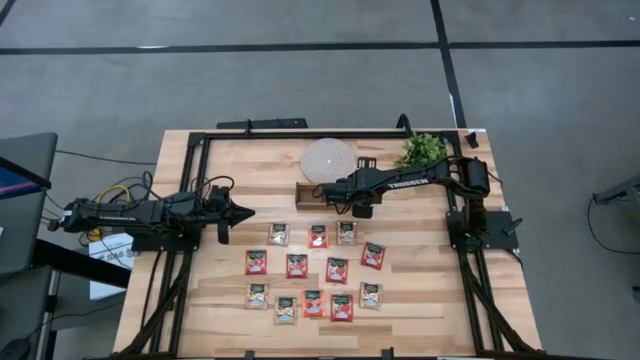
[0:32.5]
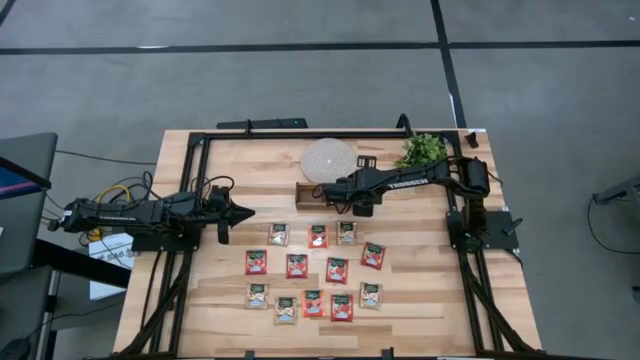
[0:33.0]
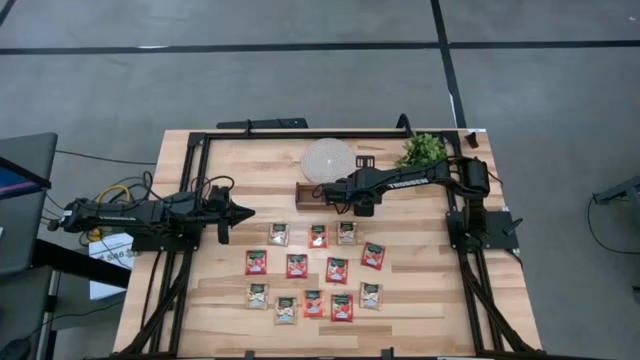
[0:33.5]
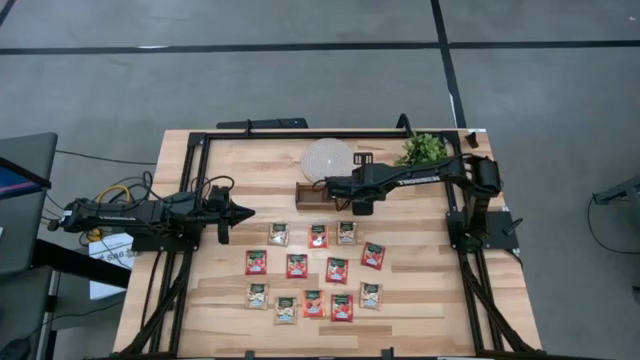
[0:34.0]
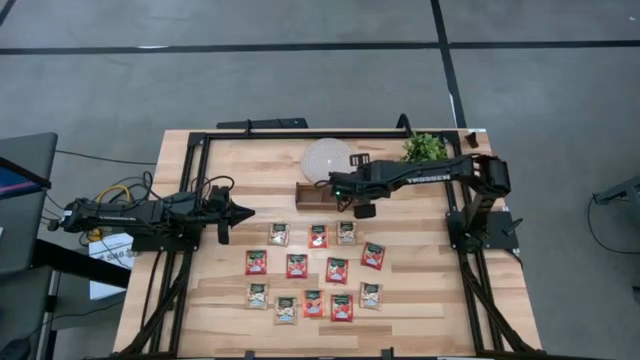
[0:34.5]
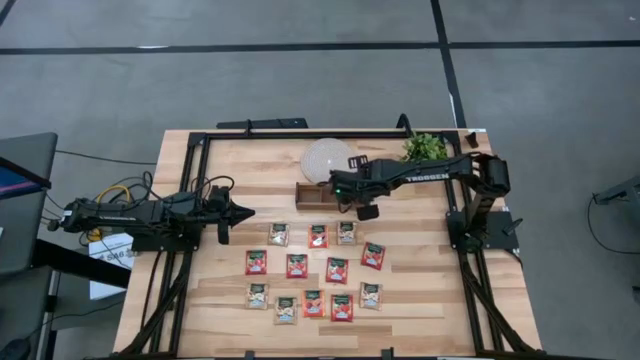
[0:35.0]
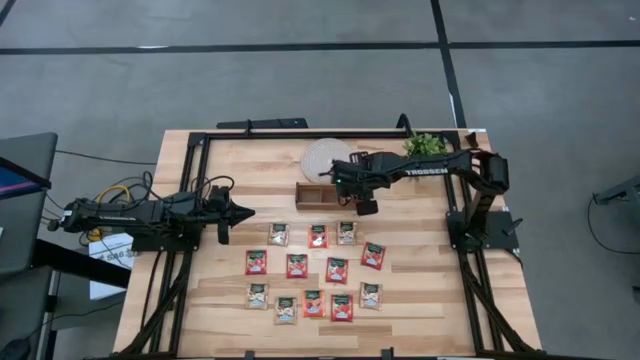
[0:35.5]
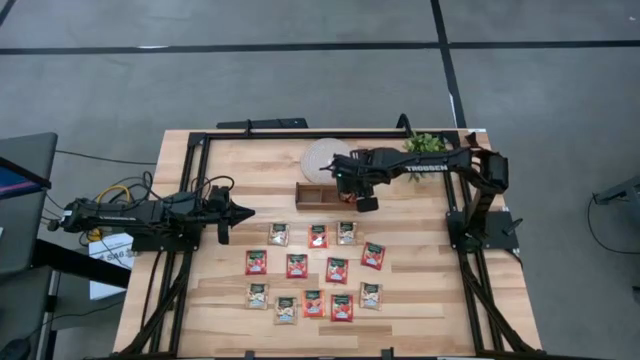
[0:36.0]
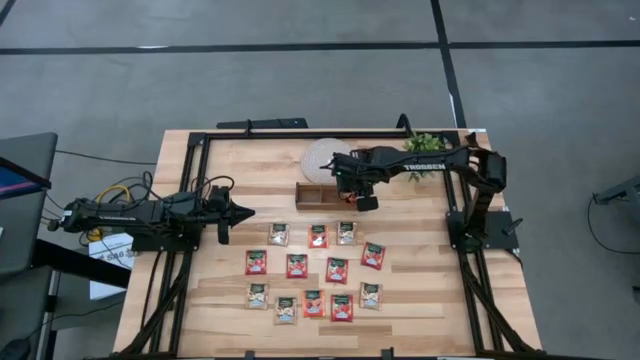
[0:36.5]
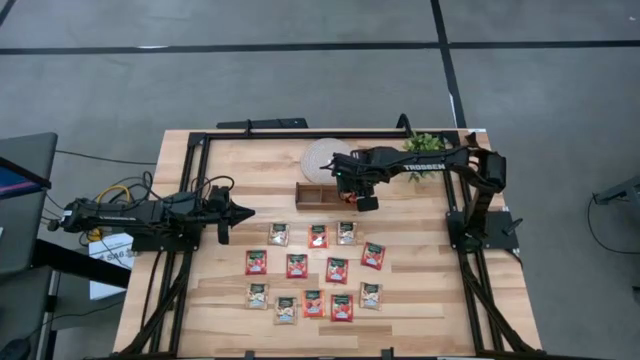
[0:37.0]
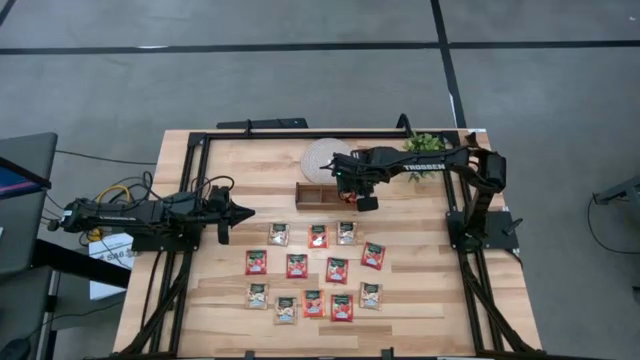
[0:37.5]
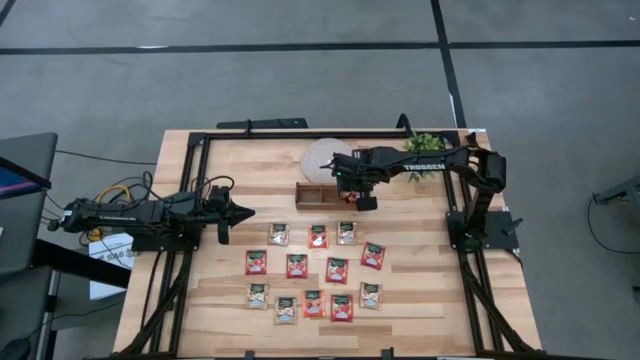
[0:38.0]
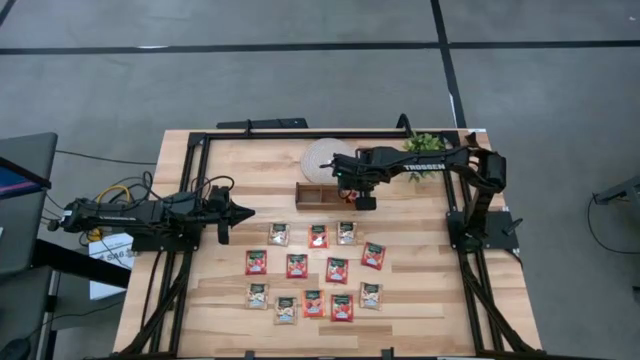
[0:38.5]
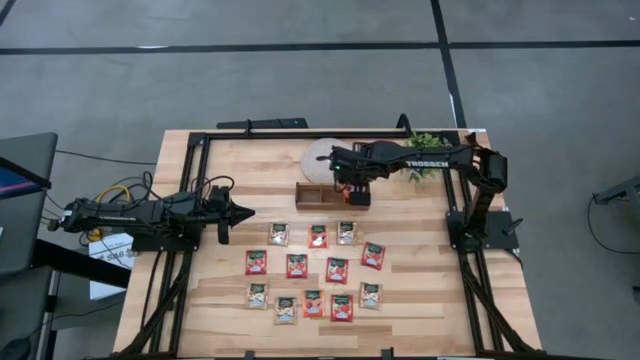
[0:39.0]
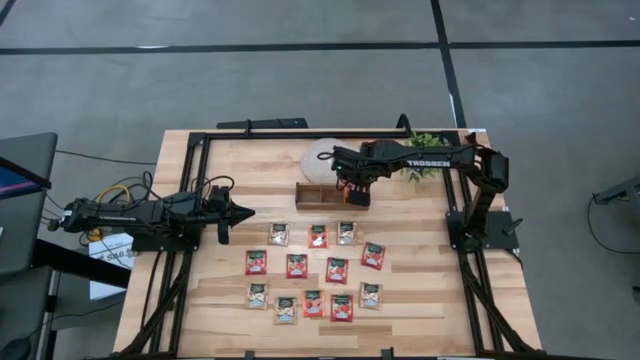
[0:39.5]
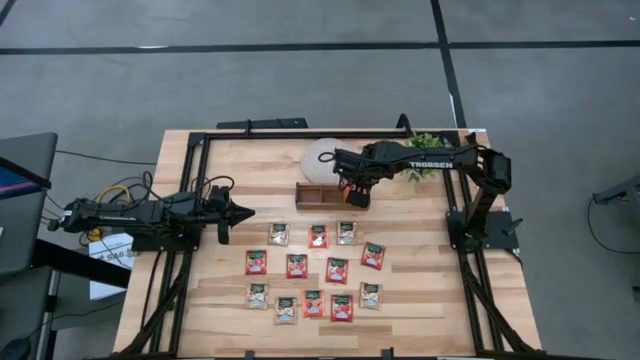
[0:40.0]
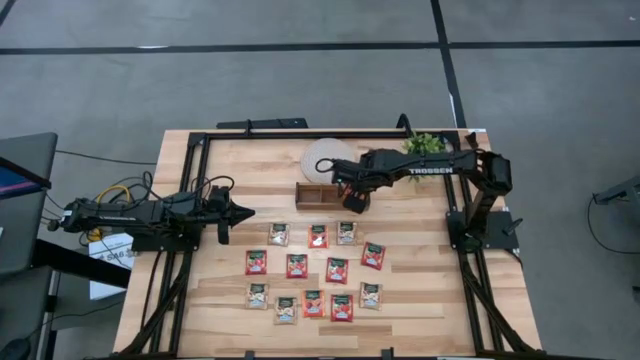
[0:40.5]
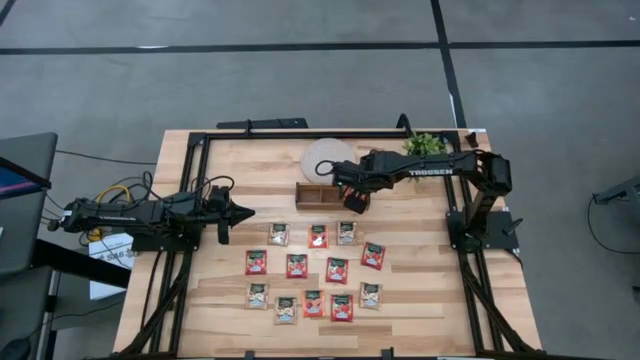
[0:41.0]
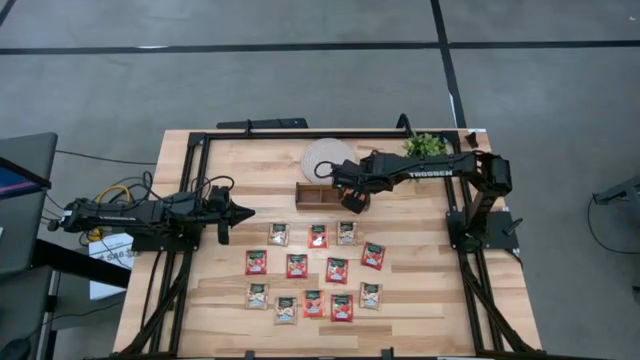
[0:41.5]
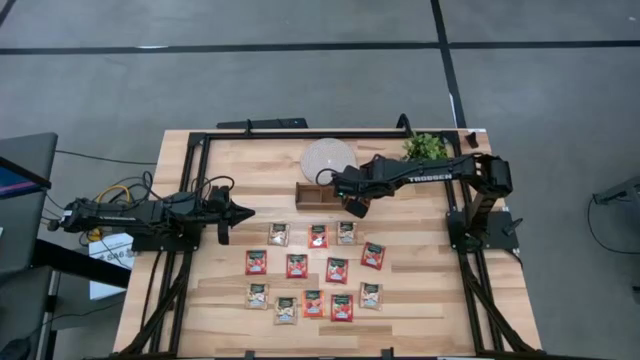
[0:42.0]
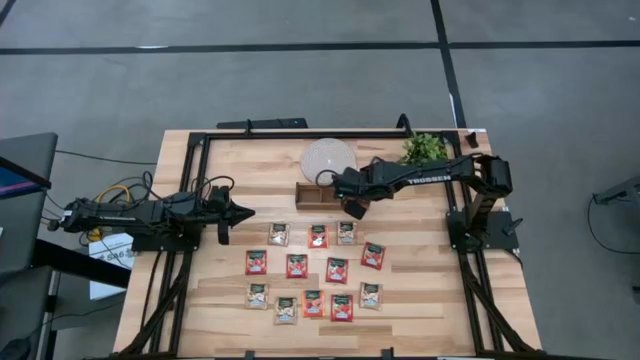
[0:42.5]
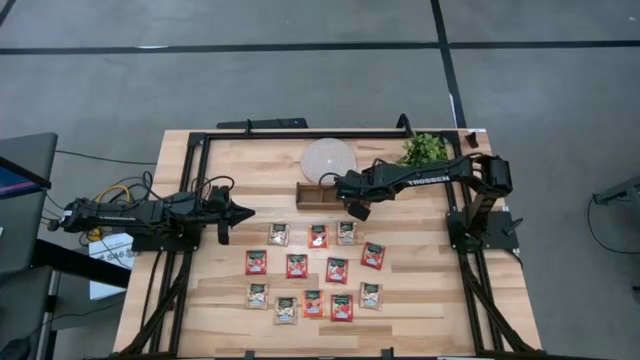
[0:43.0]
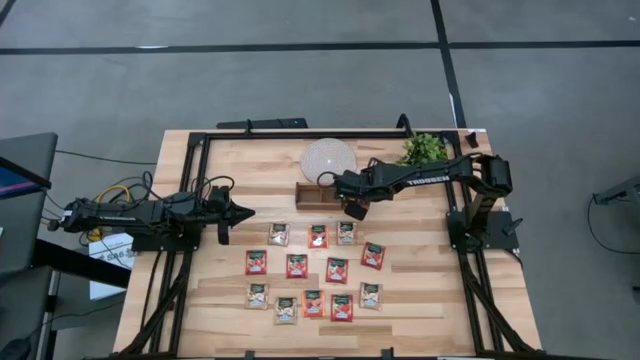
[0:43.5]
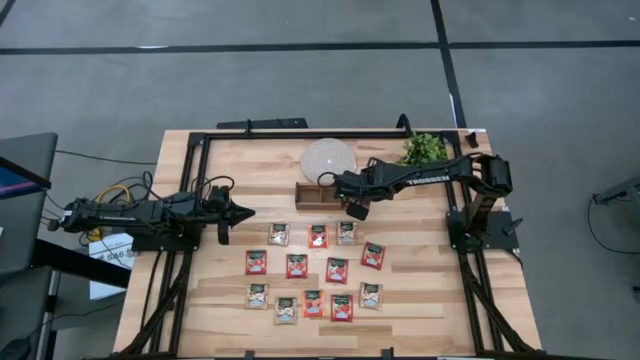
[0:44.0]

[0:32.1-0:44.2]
Task: Pick & Place Tea
Put the bottom right orange tea bag into the right compartment of the wooden organizer

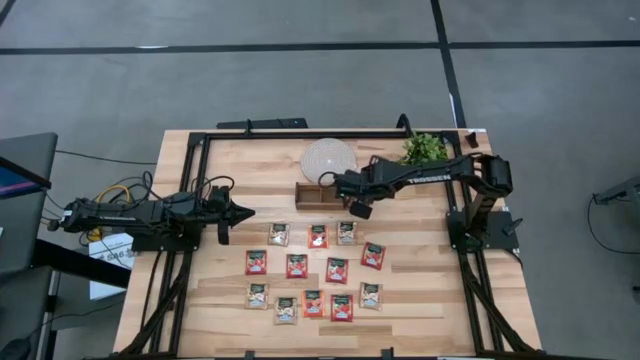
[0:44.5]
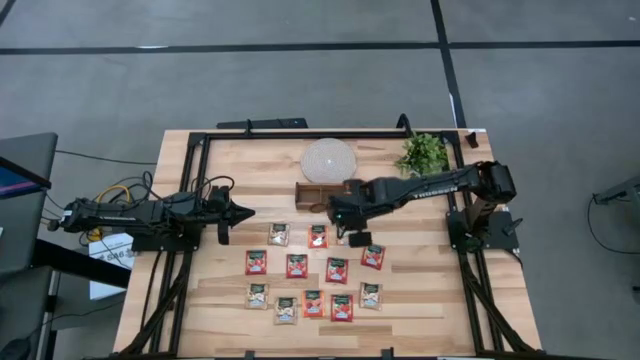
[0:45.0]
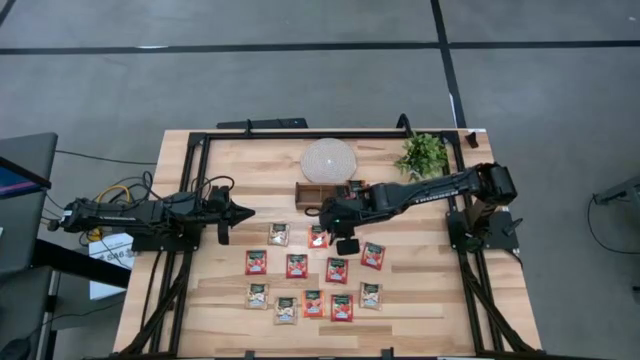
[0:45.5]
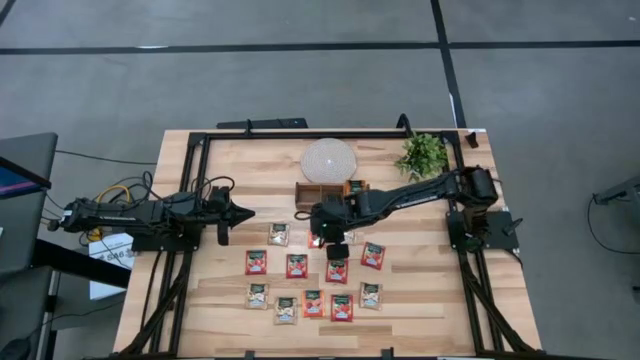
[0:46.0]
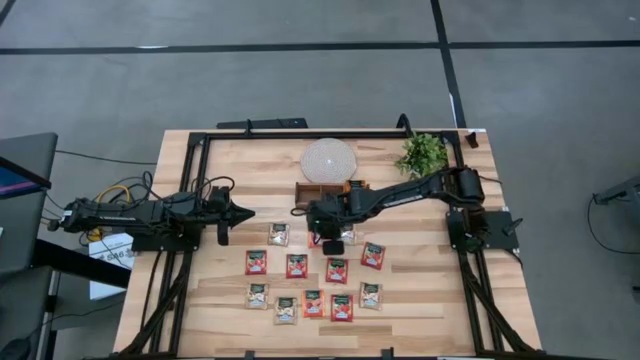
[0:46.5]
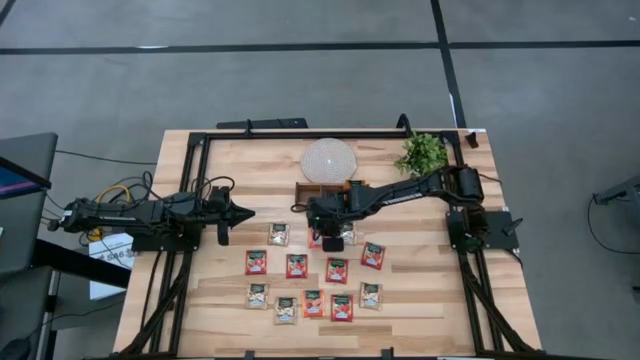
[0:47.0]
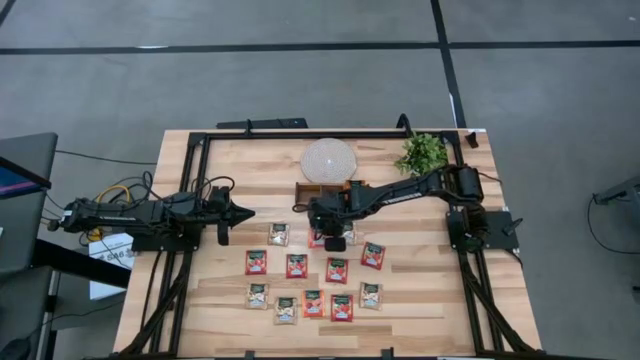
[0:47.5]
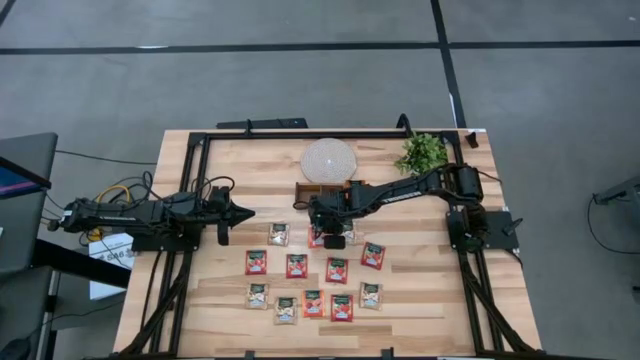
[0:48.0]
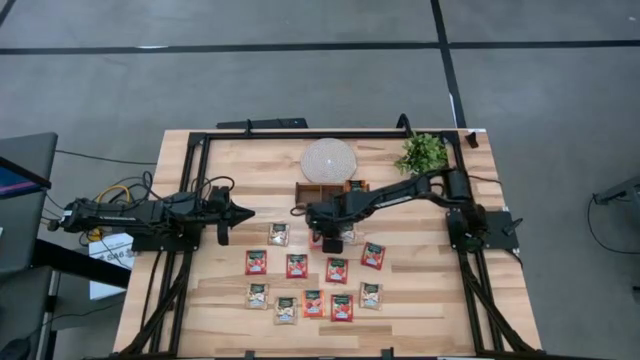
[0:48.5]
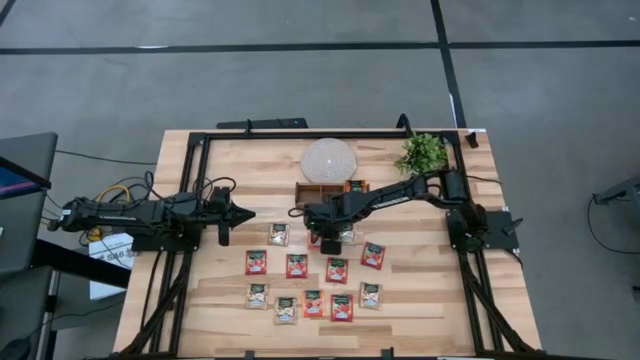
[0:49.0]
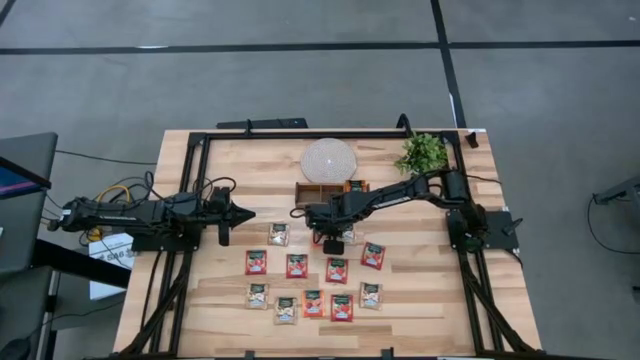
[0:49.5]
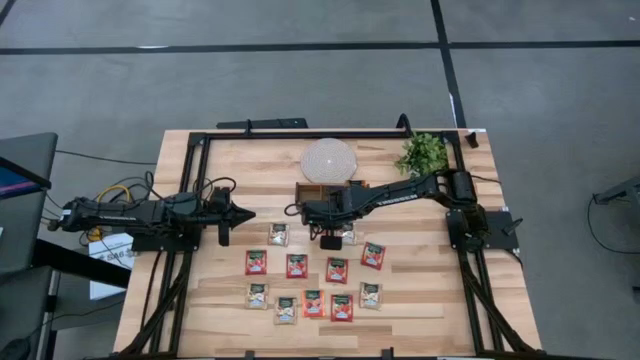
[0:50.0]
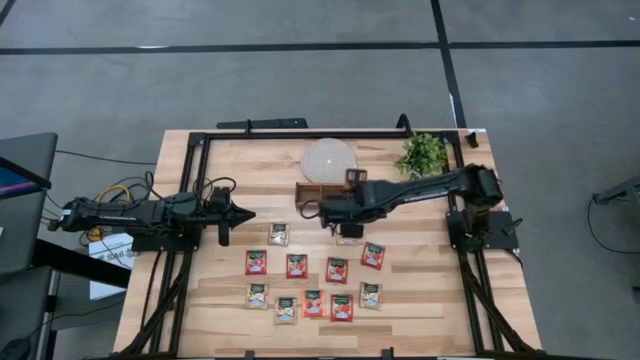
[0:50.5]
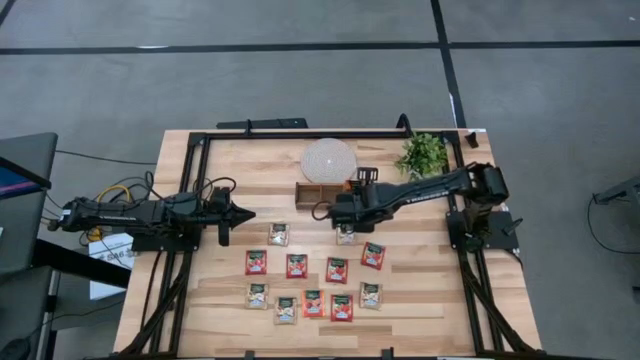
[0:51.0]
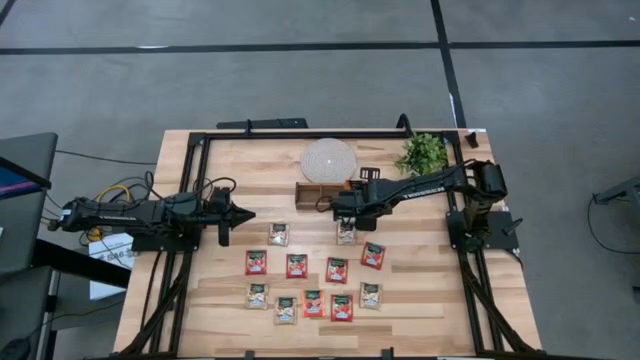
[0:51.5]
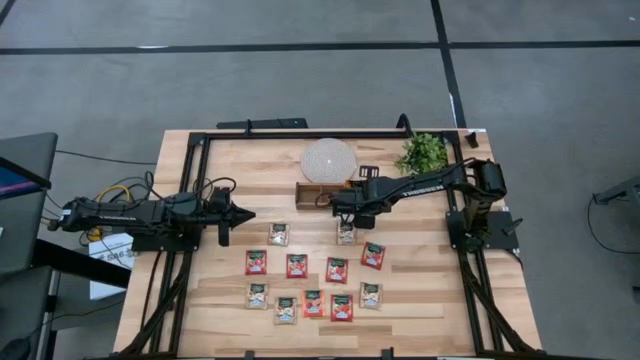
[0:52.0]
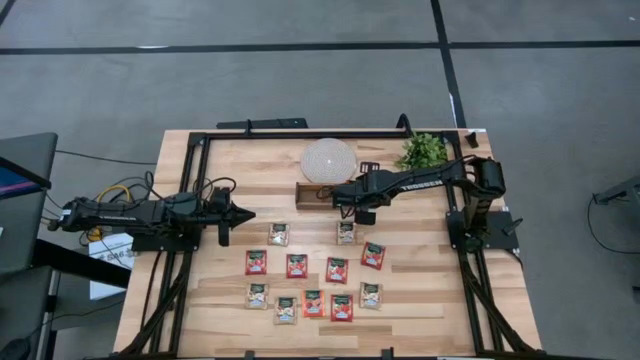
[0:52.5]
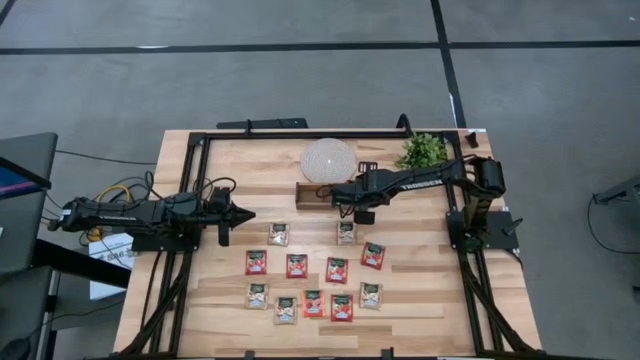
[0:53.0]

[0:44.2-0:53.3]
Put the top orange tea bag into the right compartment of the wooden organizer

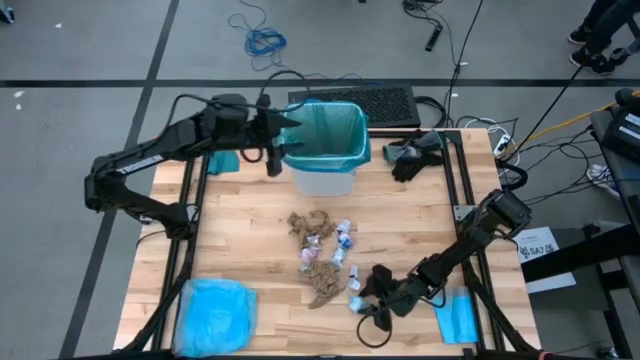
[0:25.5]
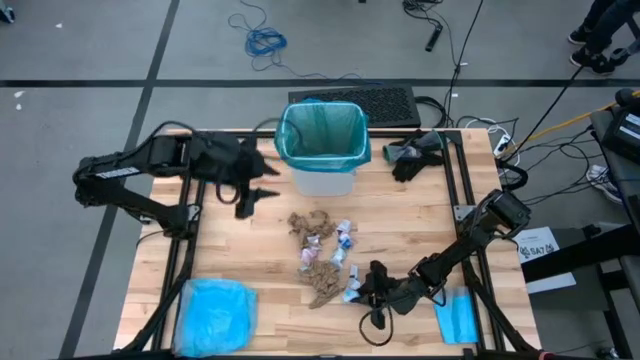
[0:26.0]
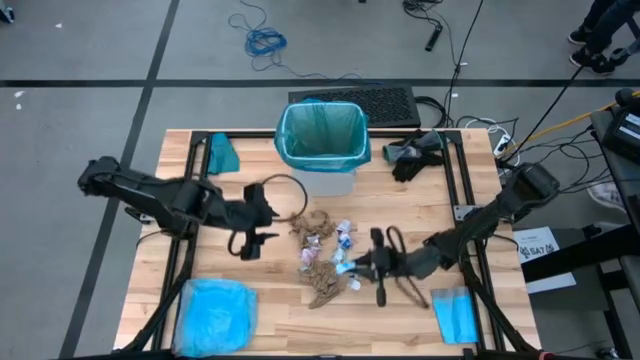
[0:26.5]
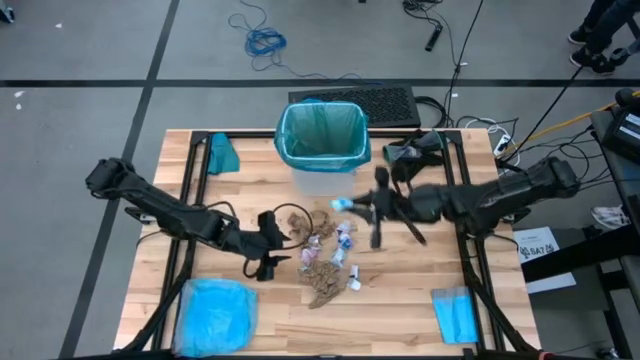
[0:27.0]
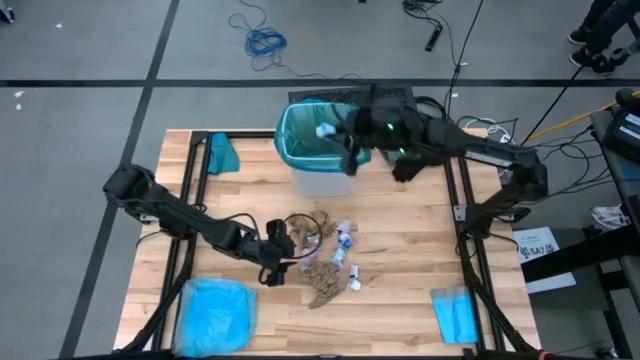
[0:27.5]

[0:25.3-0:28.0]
Task: place trash/remove bag and relplace
Put the blue trash bag into the trash bin
